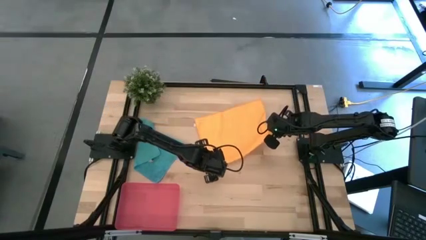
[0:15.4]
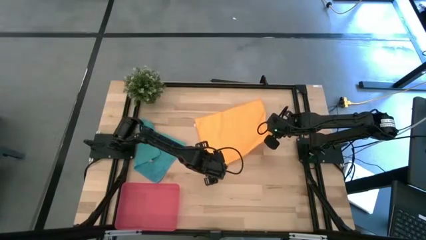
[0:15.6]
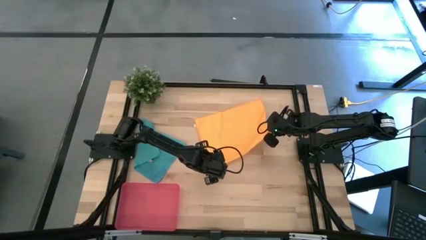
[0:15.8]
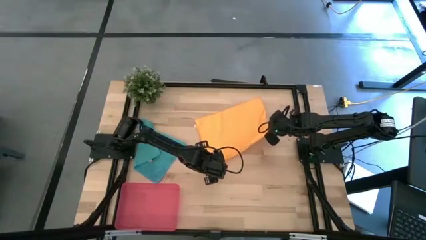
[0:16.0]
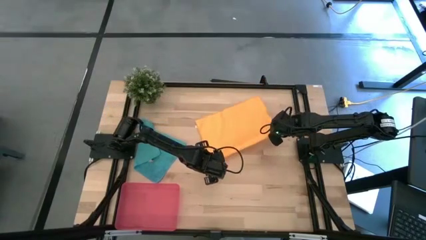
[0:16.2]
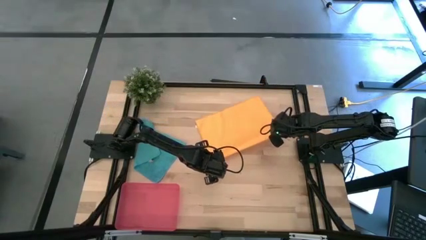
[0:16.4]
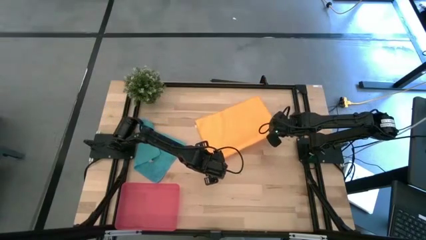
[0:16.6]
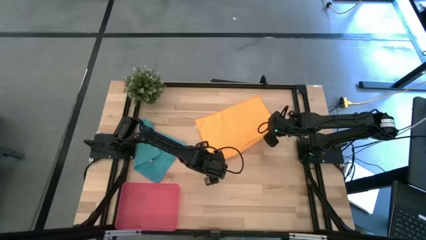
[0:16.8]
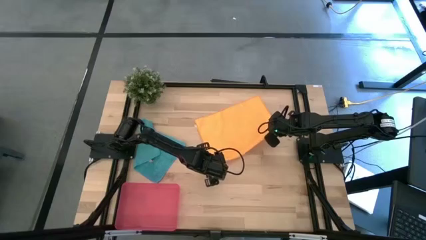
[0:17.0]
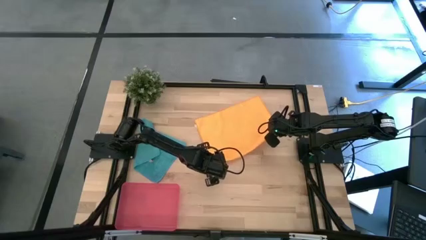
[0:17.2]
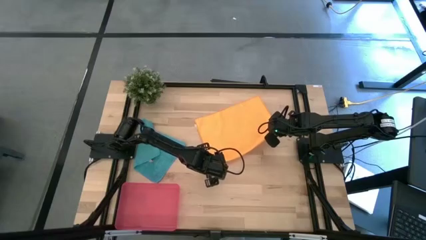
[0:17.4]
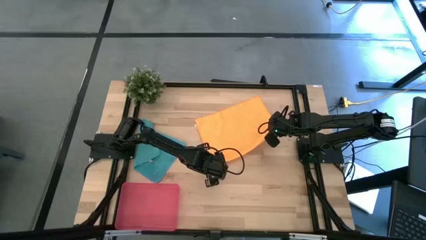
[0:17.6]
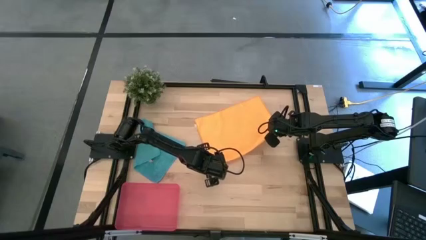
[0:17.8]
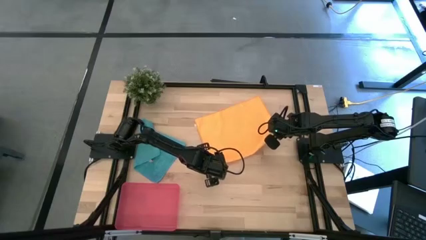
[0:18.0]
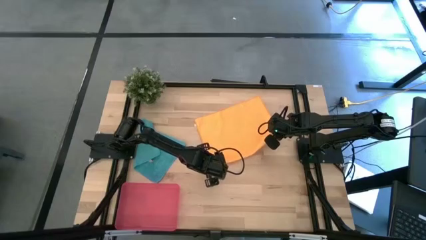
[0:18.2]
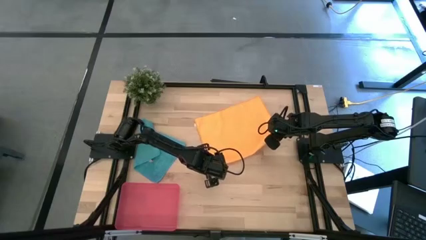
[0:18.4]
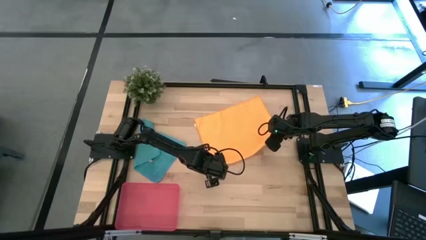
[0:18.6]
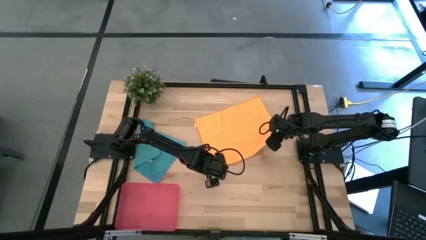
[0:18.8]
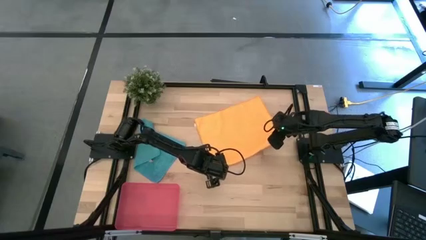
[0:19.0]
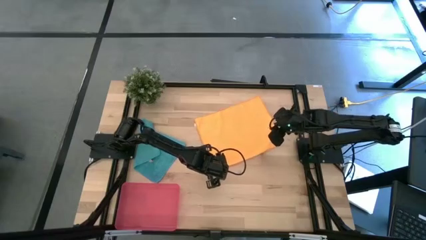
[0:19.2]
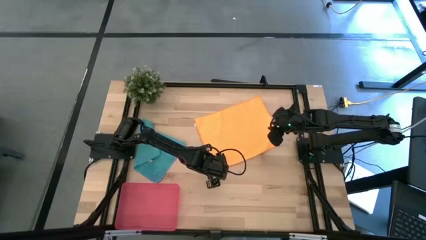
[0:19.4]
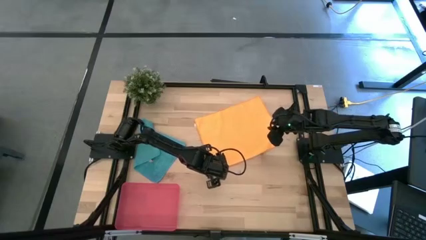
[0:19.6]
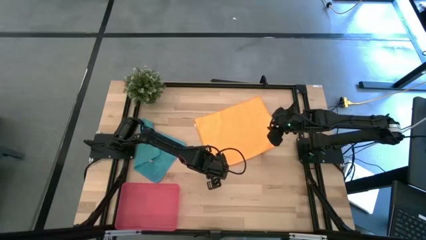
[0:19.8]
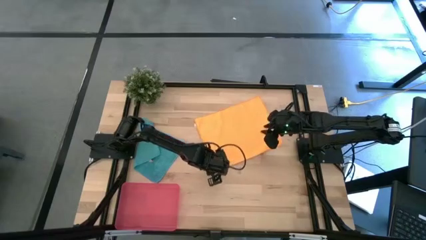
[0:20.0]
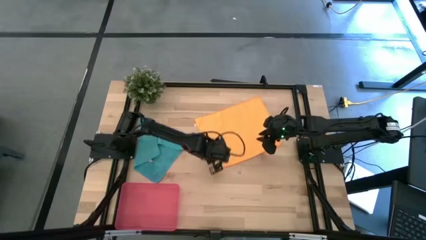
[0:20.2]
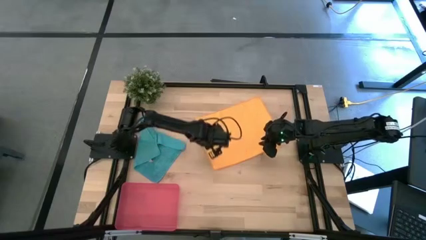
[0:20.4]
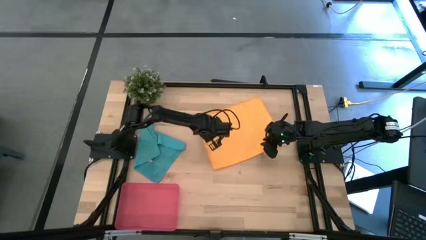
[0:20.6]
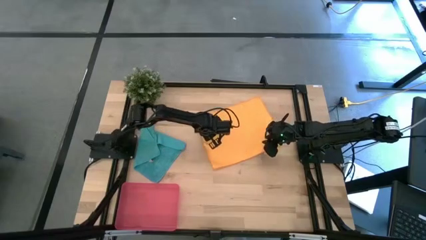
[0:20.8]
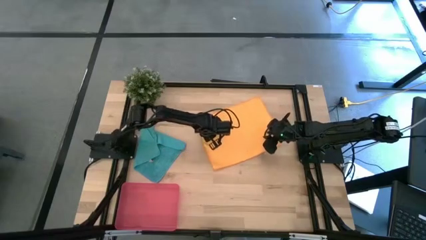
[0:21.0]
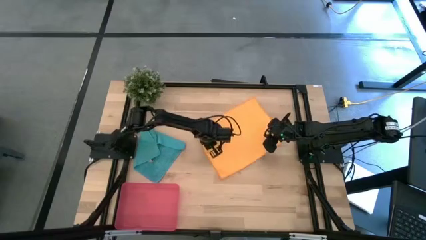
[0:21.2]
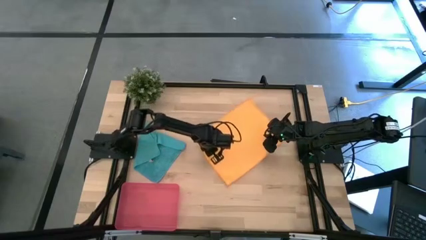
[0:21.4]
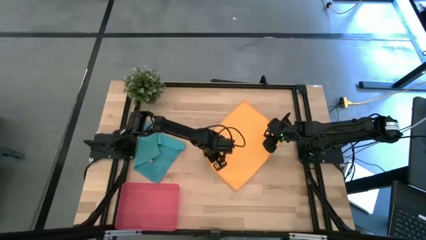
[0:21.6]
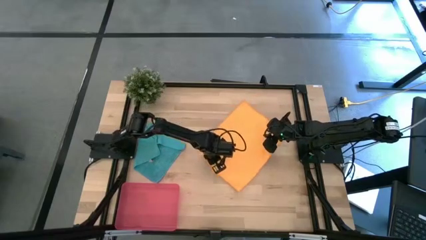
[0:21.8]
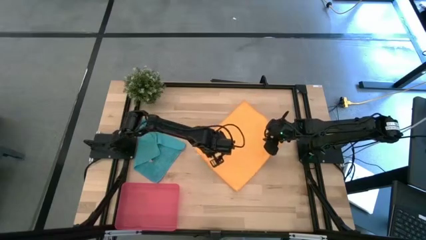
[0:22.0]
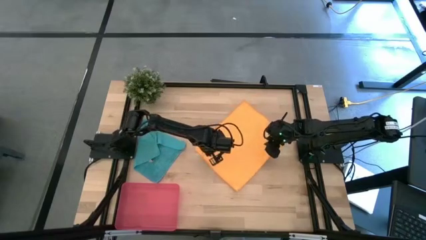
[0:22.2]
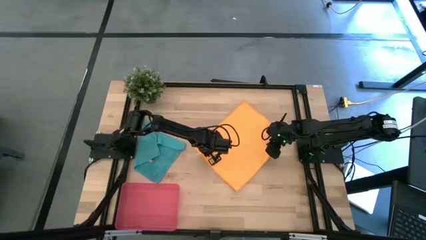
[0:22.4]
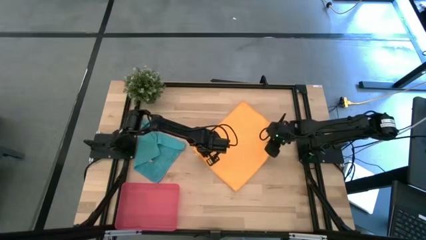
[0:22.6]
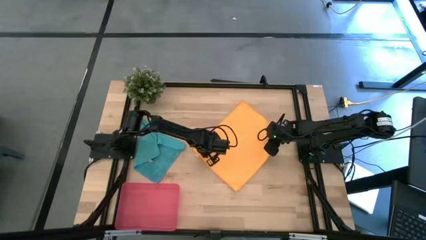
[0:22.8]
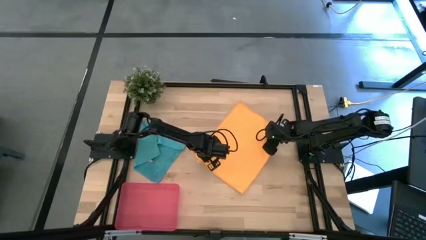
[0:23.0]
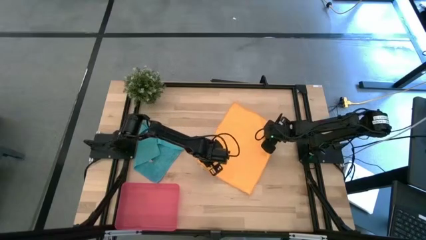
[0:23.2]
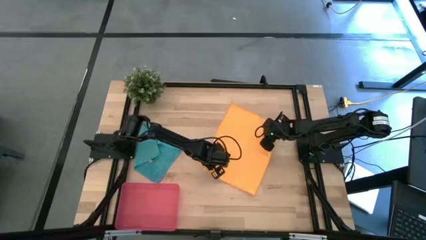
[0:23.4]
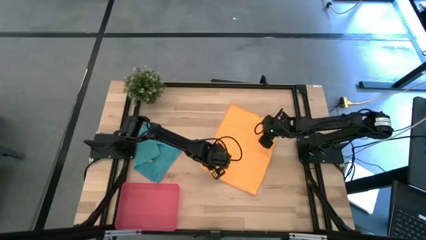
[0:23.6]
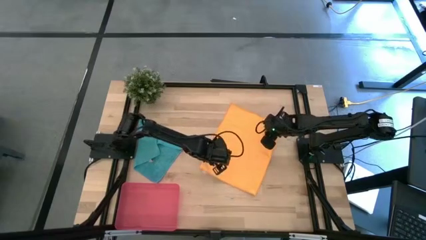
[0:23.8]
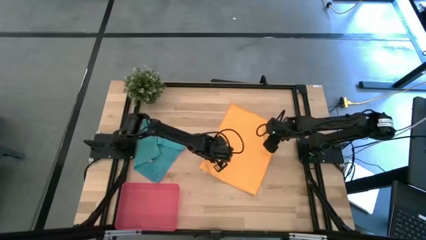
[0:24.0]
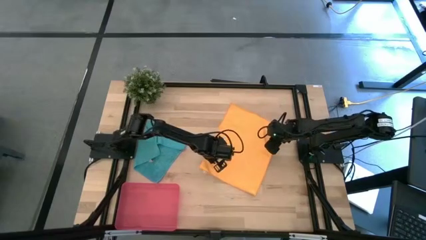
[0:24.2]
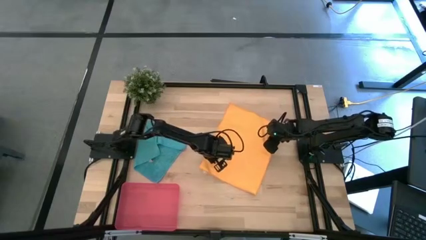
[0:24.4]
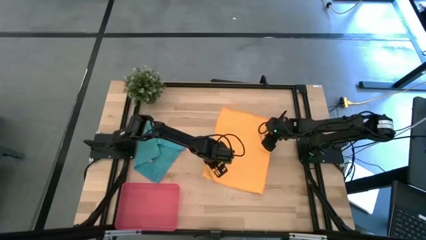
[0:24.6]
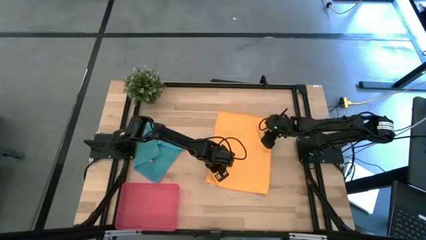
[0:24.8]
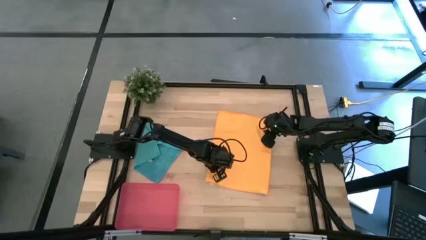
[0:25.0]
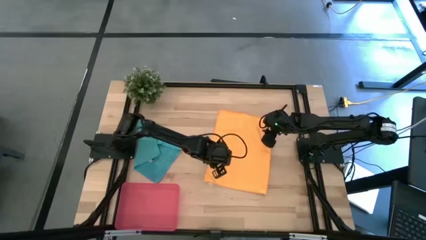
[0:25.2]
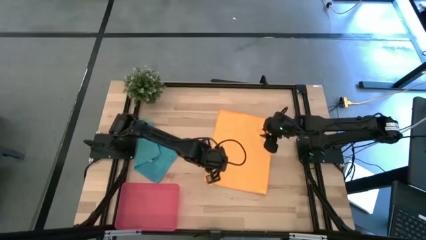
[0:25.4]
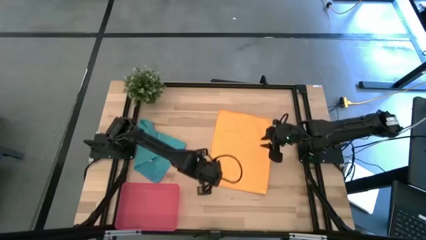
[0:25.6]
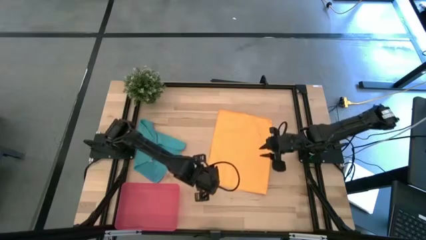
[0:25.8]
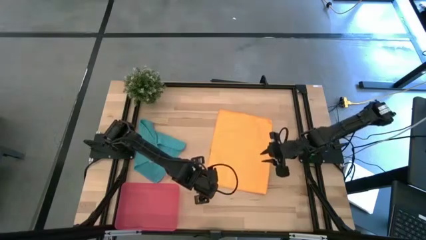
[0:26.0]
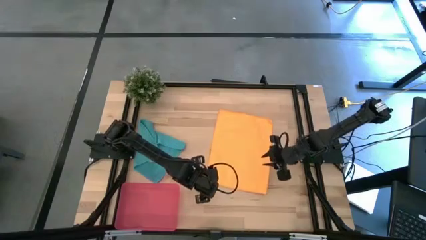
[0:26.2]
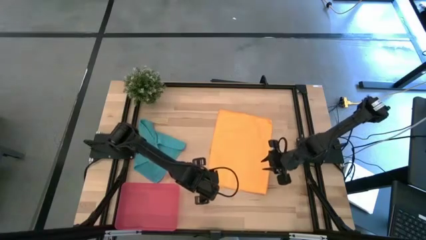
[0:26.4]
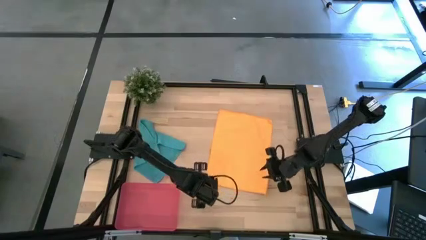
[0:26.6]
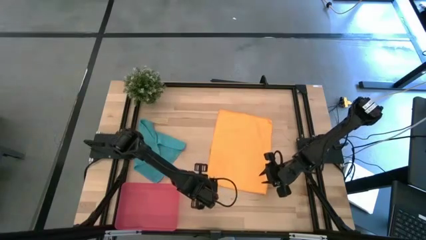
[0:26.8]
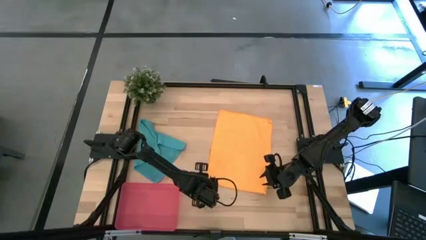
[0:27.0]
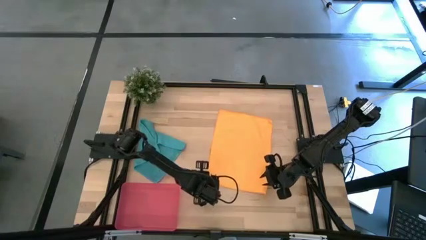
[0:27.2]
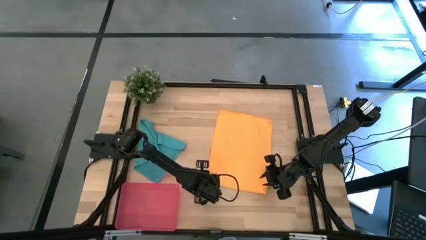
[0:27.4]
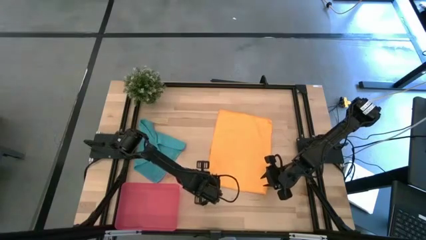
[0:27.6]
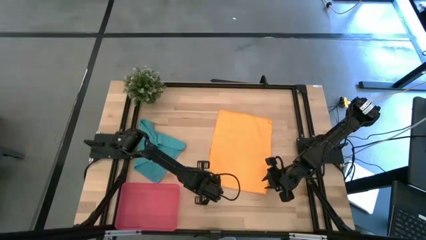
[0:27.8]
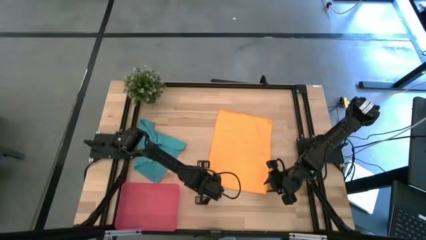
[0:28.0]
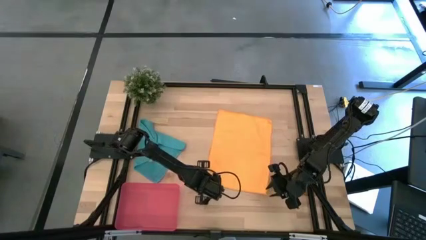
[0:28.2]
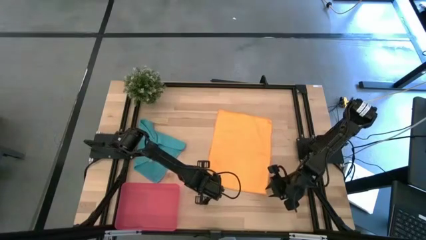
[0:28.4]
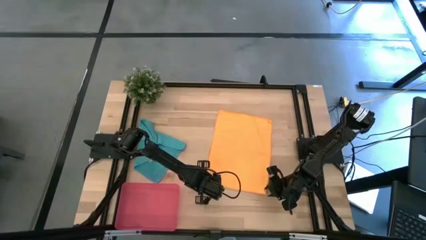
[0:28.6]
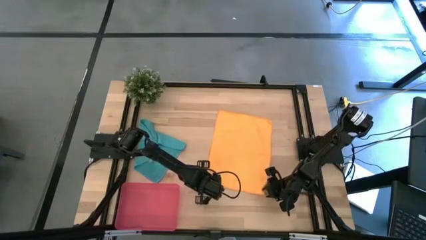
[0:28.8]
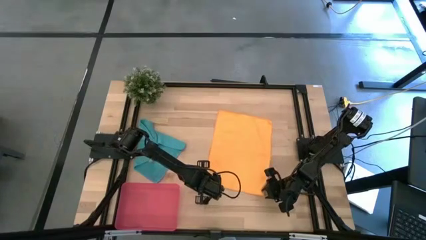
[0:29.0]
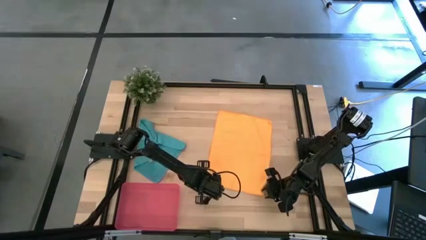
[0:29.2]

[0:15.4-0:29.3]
Task: Roll microfiber towels into tight, uniform cylinder then place into a basket
Fold the yellow microfiber cloth
